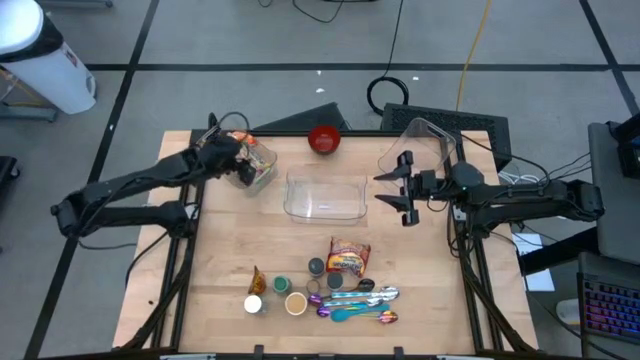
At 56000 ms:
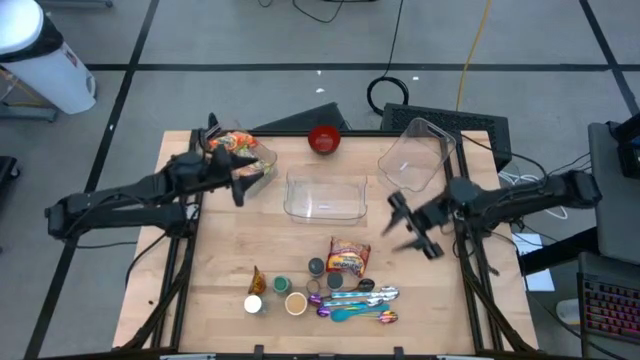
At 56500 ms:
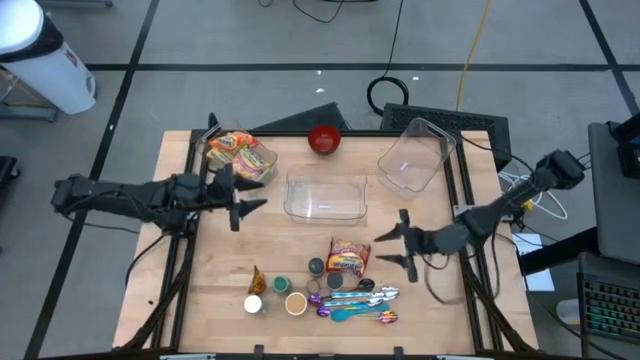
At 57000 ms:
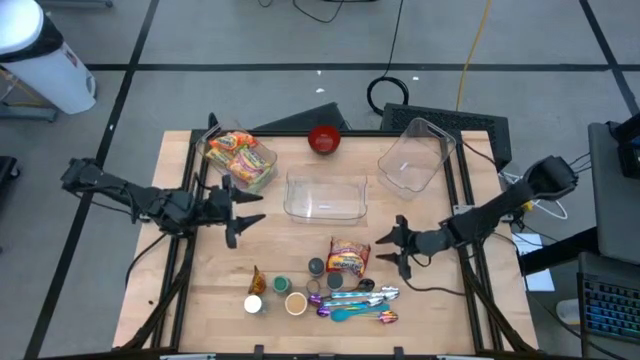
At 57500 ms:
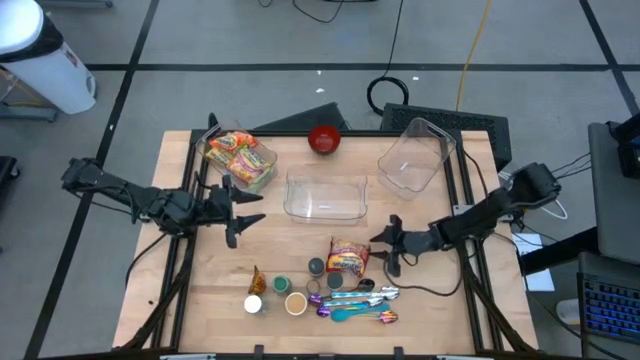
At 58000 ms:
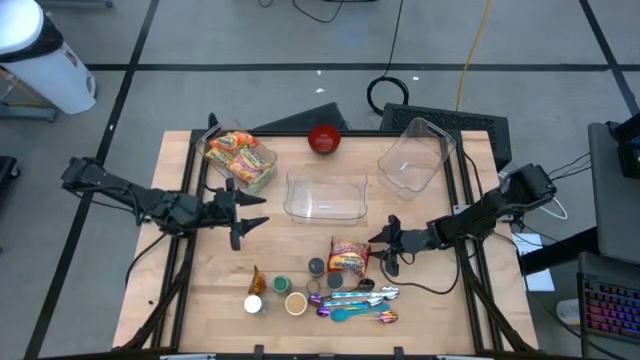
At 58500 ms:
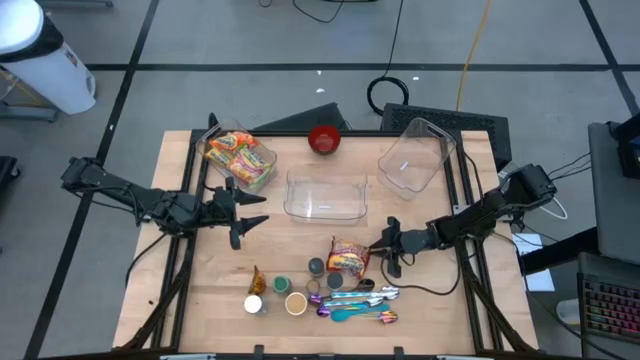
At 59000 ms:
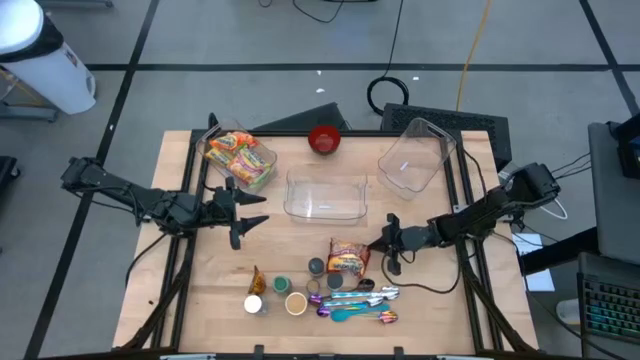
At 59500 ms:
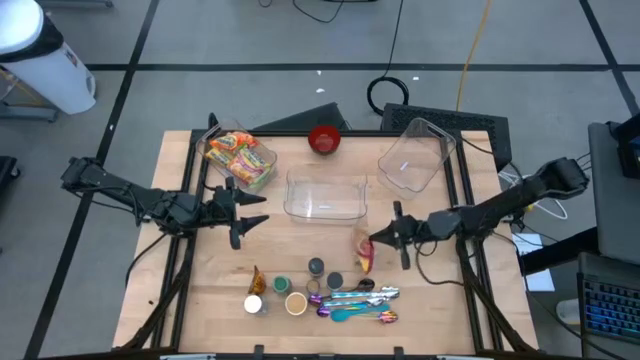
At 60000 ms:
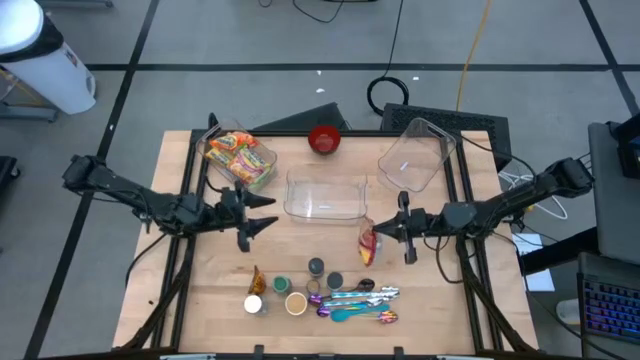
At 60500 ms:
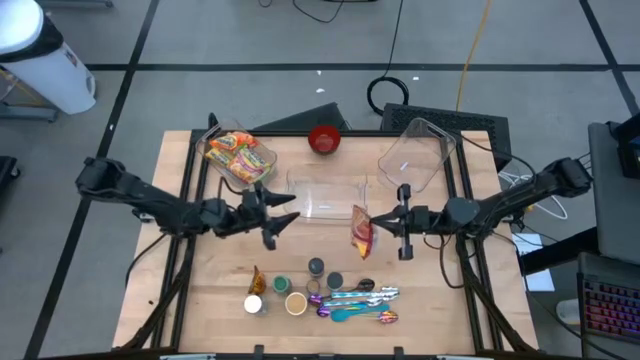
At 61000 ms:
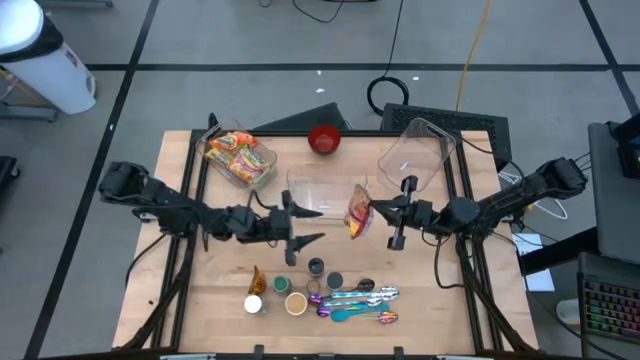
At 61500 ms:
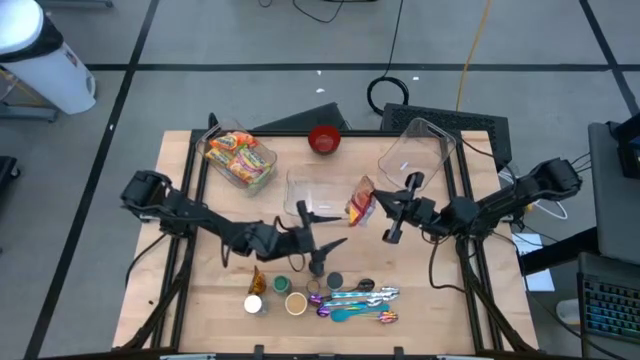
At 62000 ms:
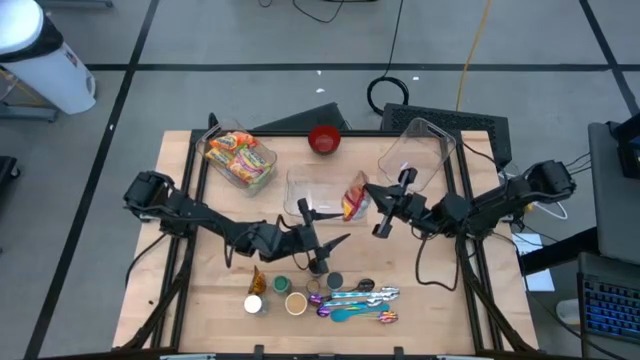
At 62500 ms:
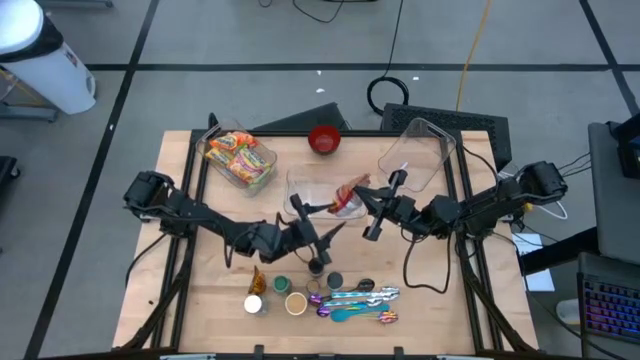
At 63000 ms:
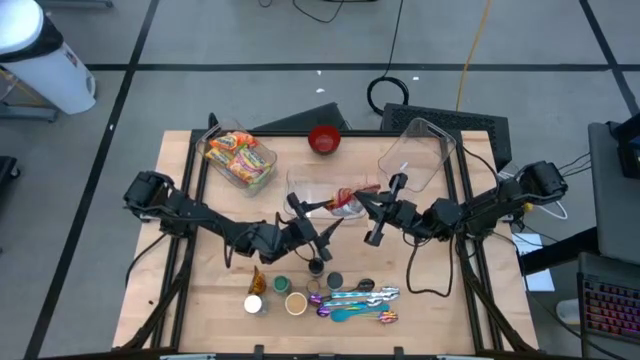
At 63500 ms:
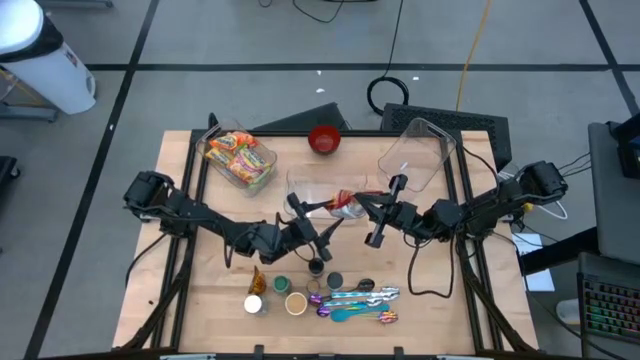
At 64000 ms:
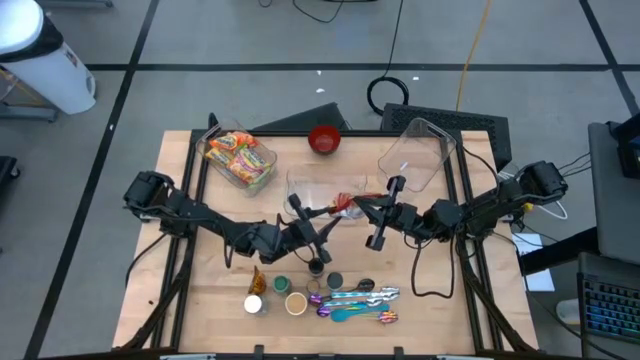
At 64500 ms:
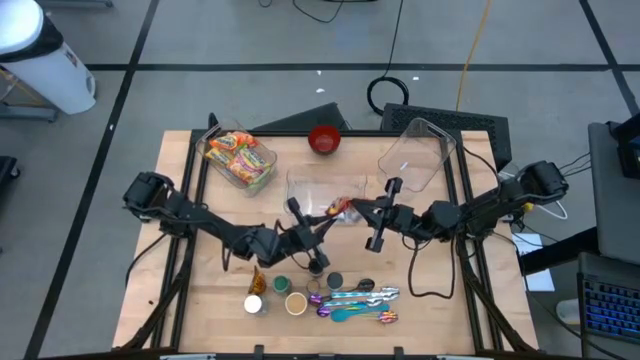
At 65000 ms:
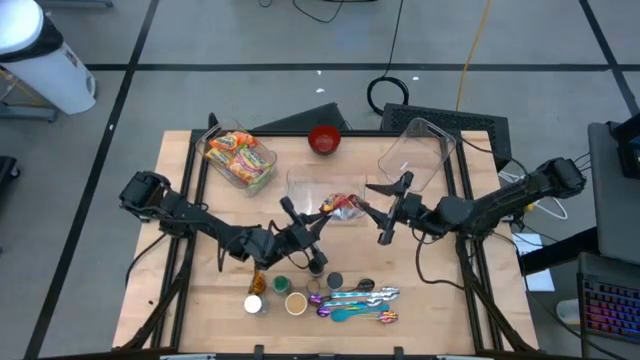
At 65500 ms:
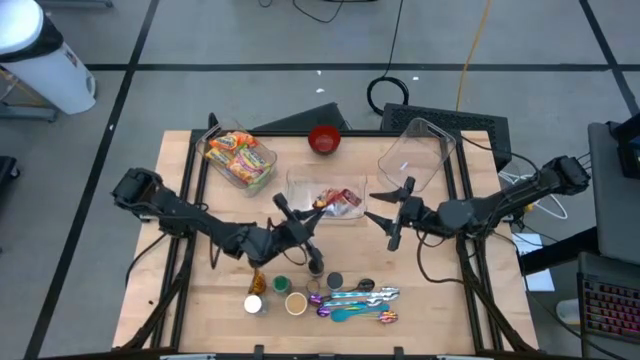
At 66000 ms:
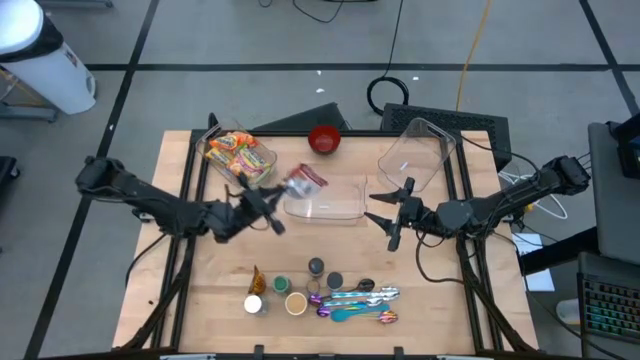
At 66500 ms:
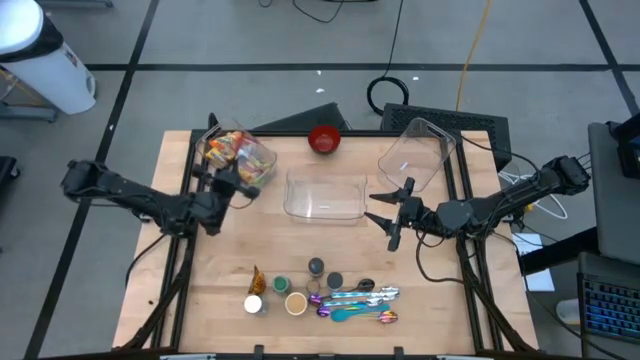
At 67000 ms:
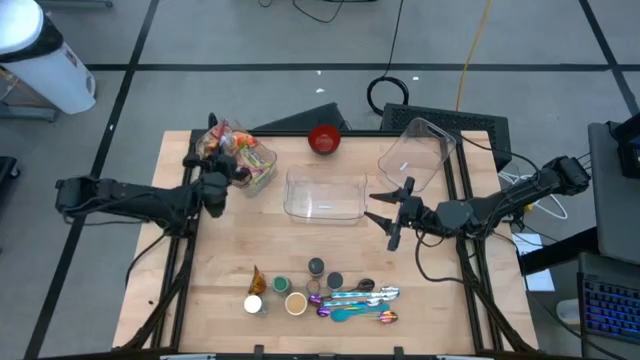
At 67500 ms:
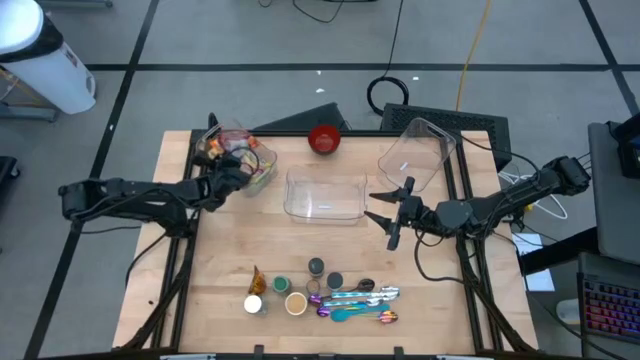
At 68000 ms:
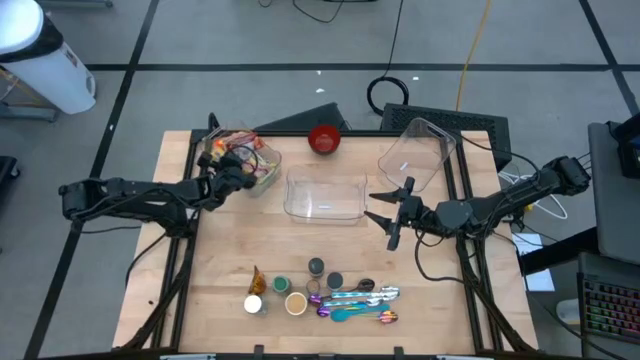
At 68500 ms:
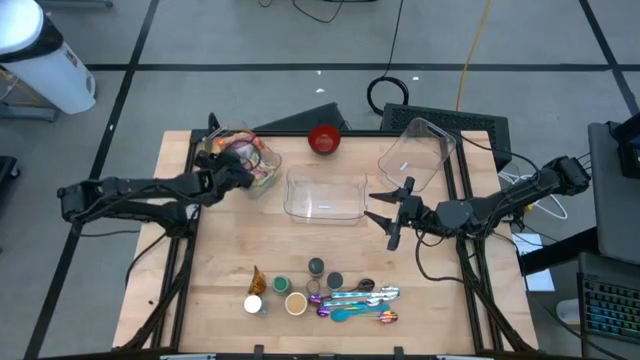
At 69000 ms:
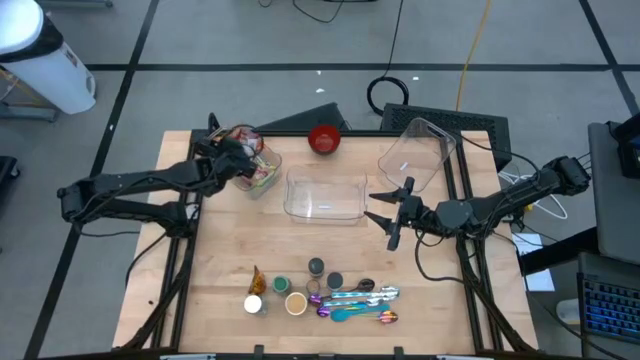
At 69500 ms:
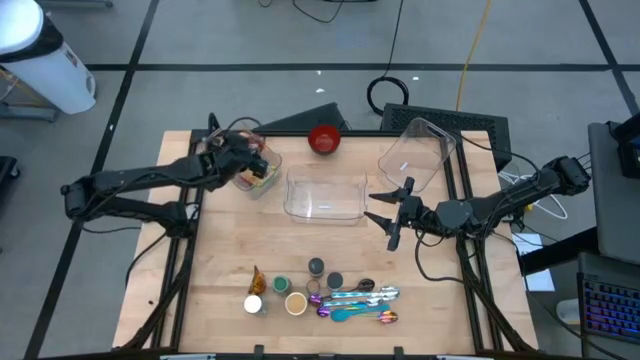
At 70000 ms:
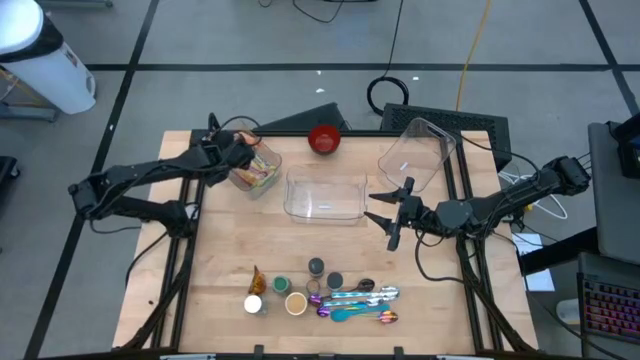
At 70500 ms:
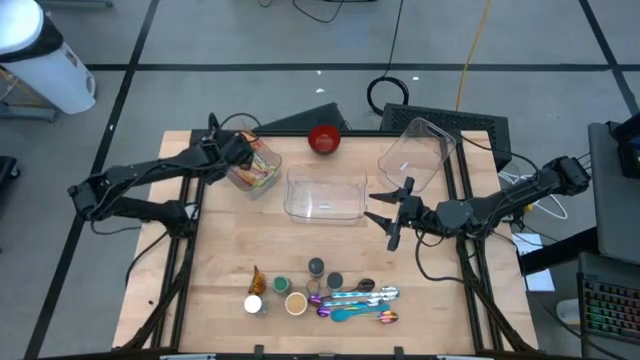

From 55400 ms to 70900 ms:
Task: Pick & Place Food Item
Put the red noodle pack into the left transparent bin

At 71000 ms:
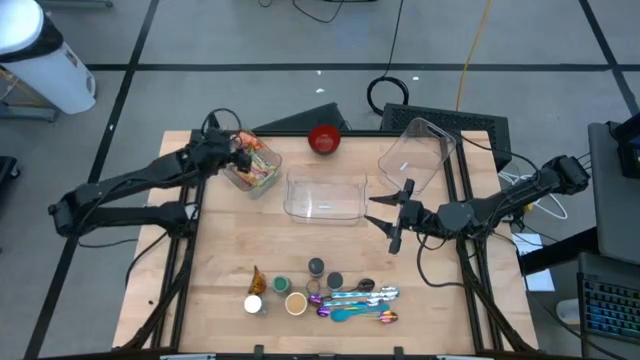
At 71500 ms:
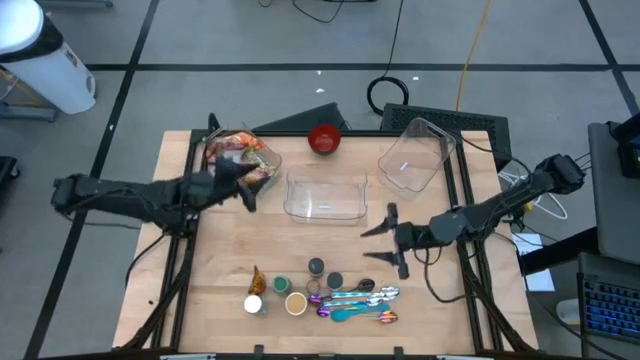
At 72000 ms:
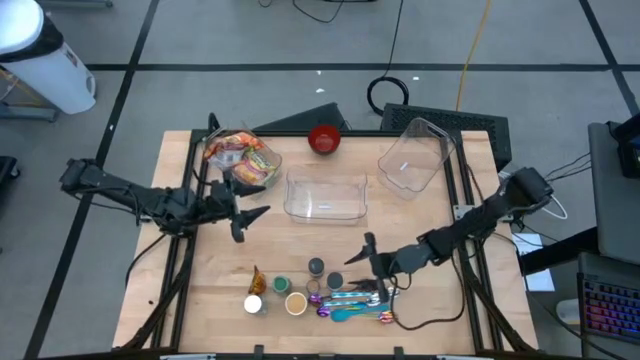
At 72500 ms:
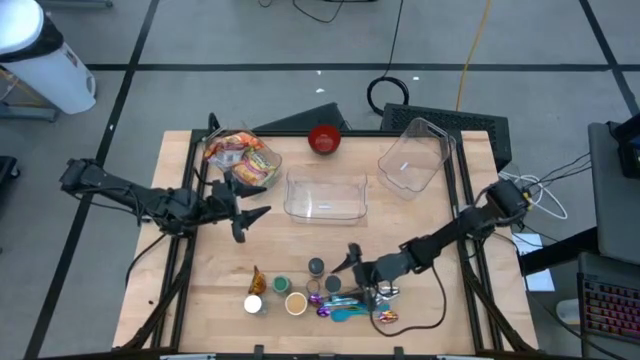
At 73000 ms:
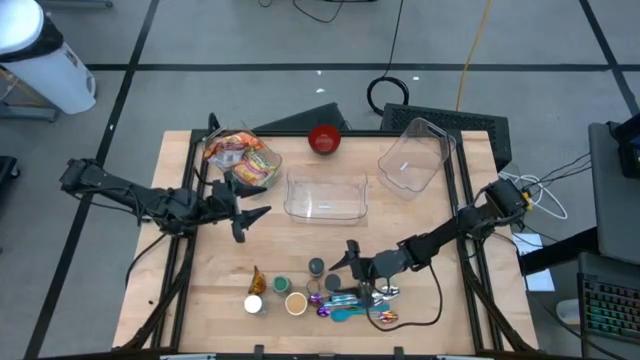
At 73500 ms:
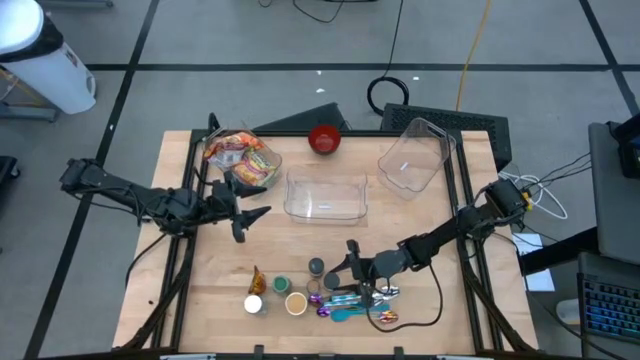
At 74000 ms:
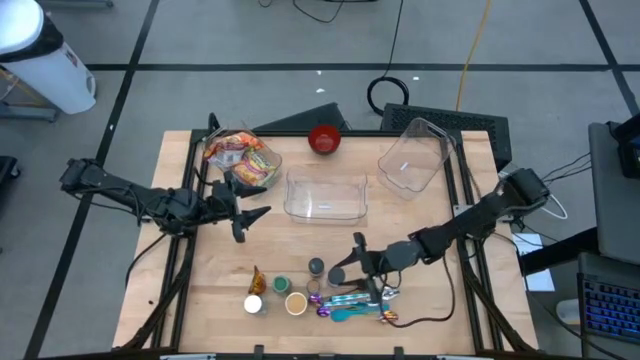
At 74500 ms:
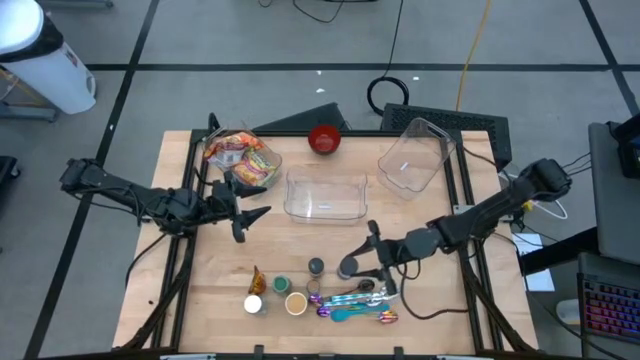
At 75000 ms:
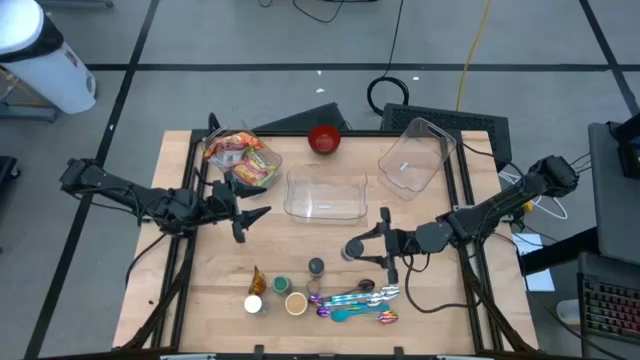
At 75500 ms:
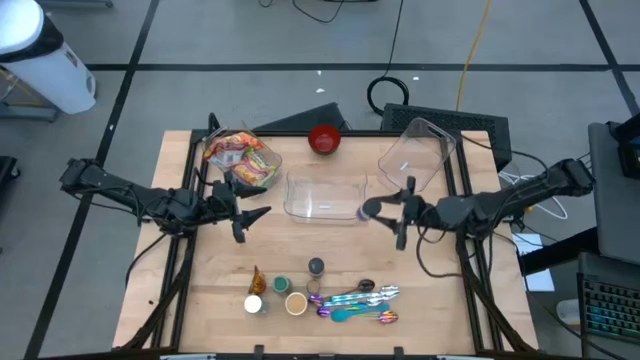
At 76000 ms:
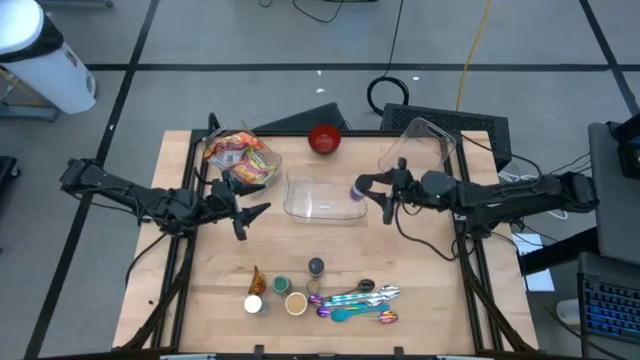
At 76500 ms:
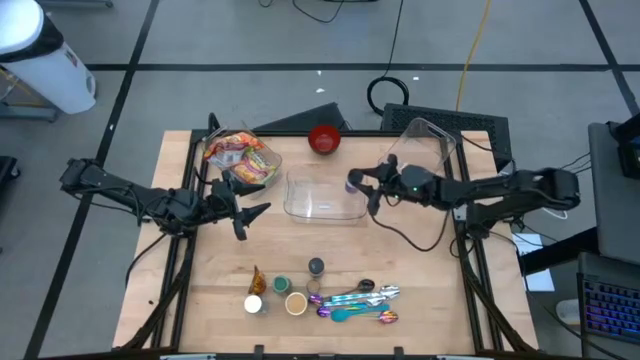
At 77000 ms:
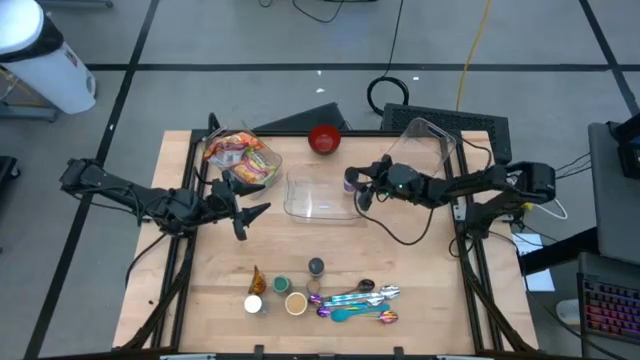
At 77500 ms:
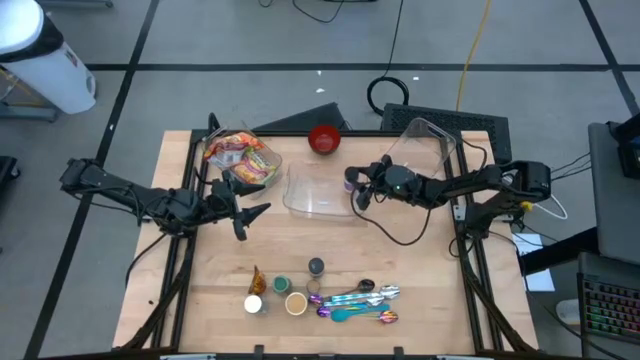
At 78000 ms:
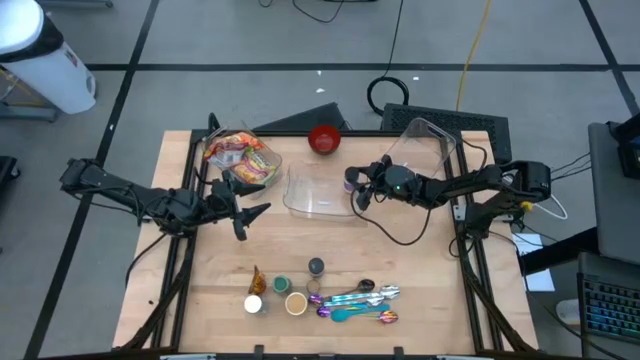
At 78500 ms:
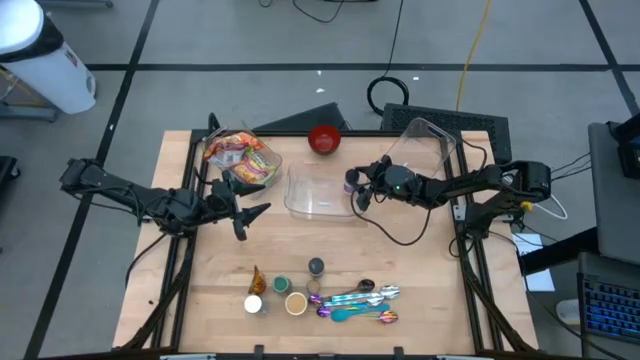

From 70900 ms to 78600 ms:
Put the violet seasoning bottle into the center transparent bin
